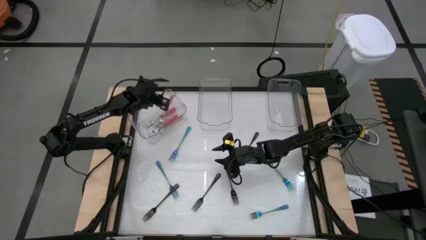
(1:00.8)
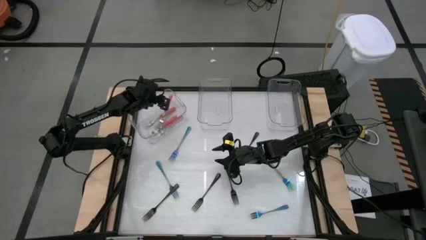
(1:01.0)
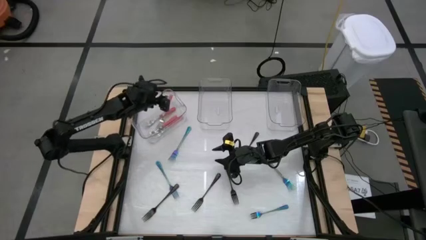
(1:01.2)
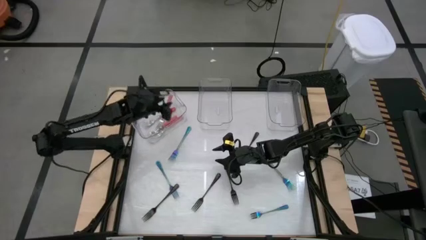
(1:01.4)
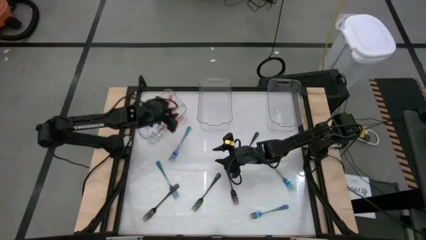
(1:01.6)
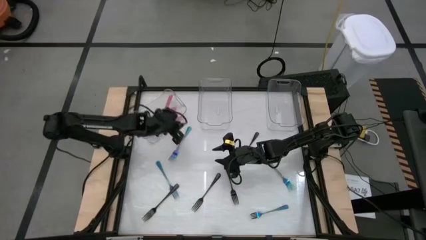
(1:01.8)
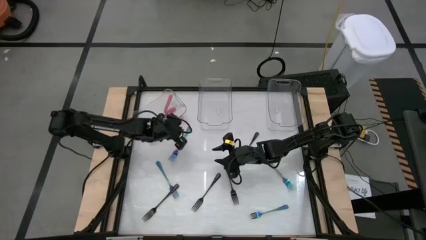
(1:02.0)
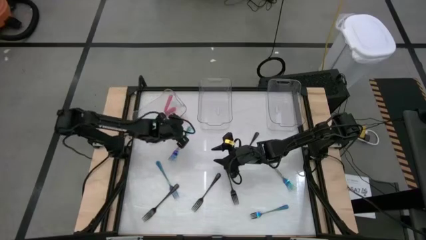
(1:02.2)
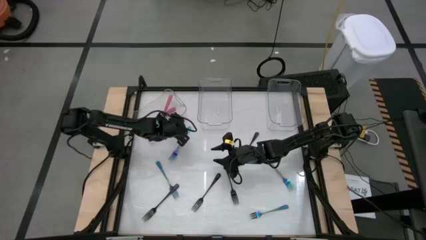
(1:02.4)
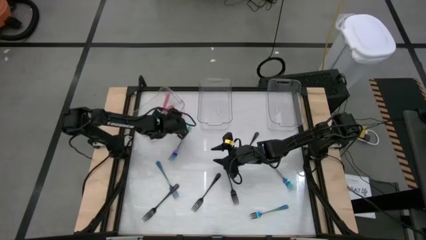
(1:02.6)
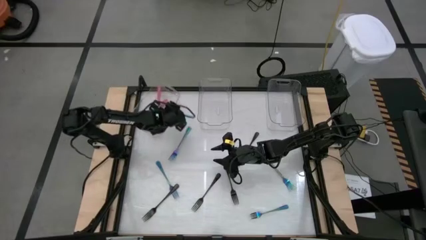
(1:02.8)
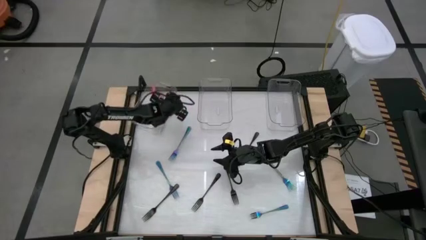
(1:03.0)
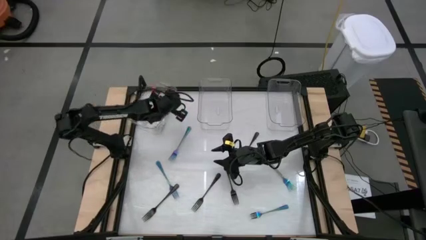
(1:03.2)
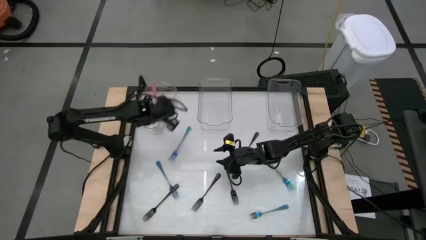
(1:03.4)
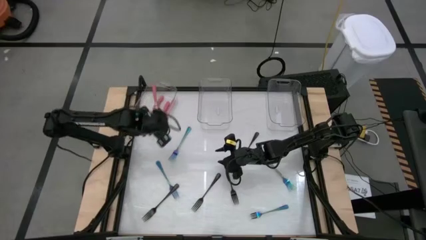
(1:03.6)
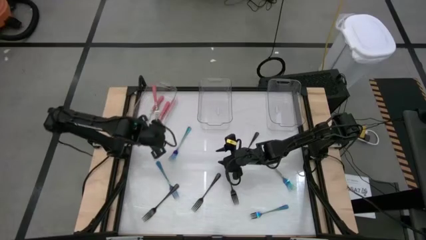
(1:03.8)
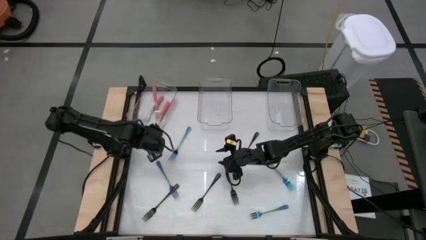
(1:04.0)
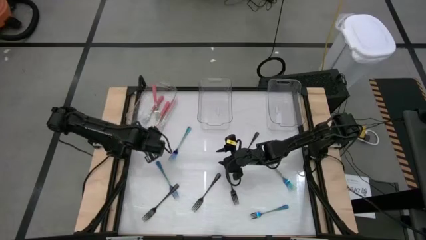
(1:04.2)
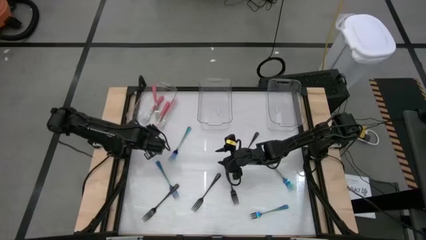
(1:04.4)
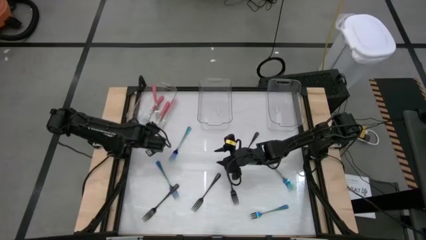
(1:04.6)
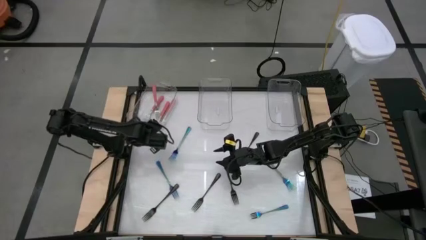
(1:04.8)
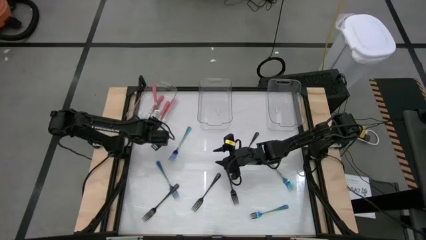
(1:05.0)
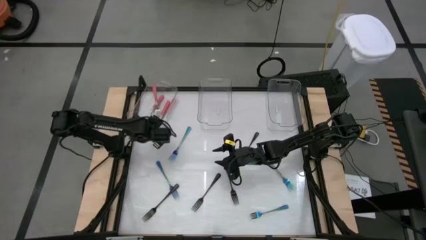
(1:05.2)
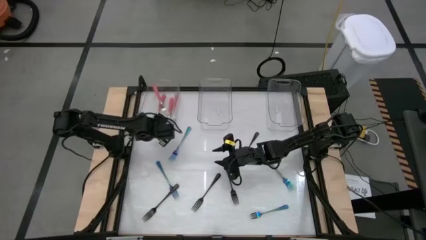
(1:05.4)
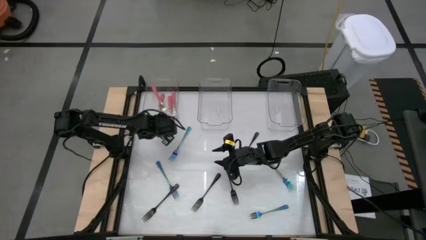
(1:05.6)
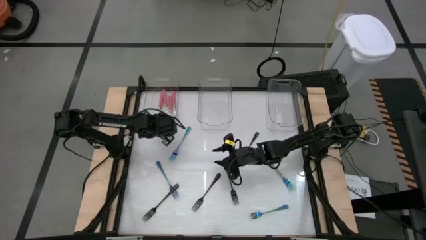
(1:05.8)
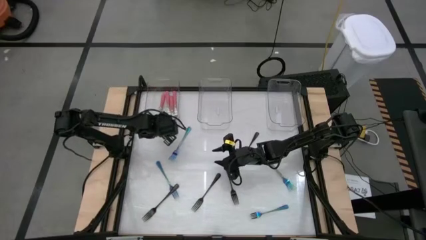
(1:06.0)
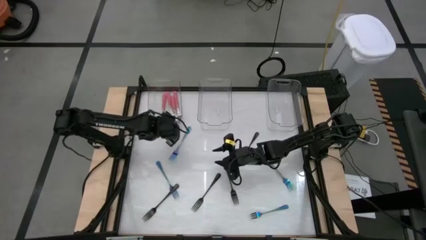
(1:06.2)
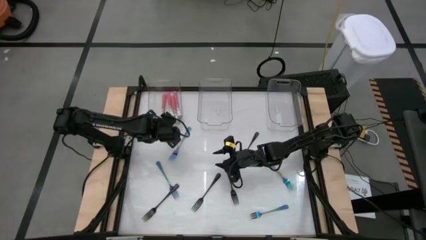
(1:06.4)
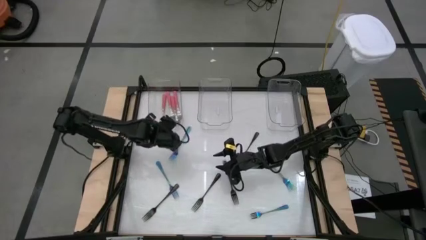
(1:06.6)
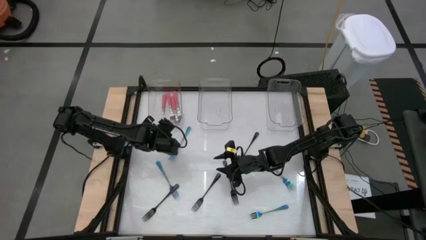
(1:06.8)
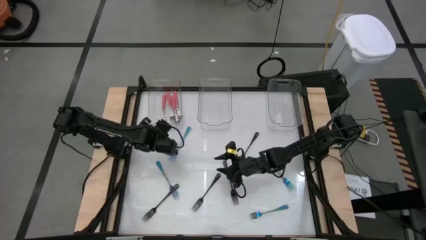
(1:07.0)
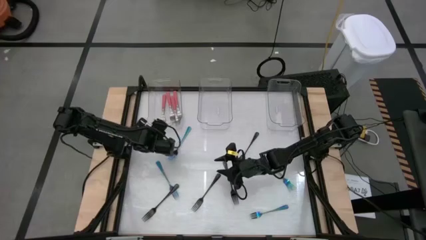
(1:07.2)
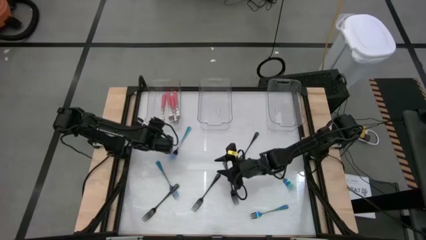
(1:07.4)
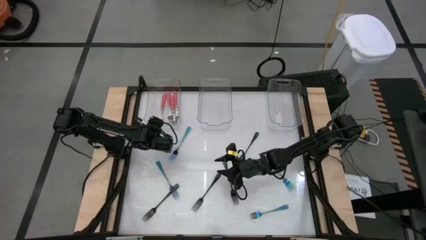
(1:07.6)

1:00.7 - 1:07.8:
Task: Sort silverware by color (type)
Adjust the left transparent bin on the table

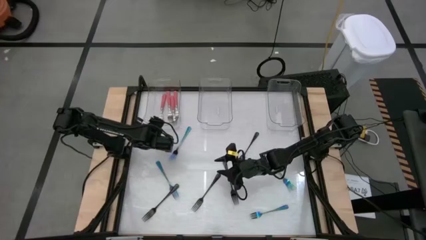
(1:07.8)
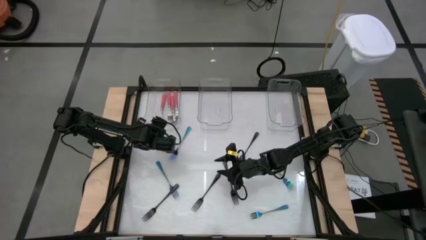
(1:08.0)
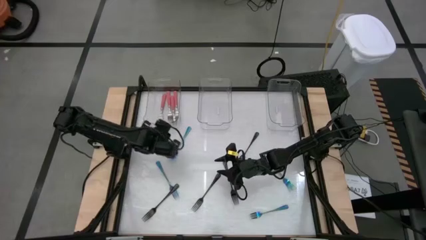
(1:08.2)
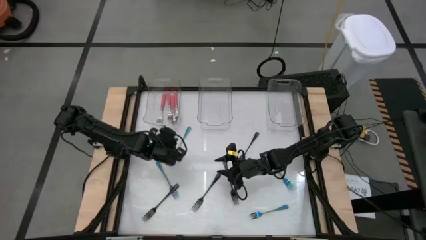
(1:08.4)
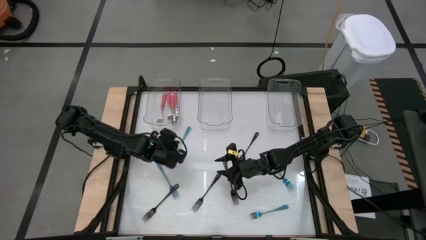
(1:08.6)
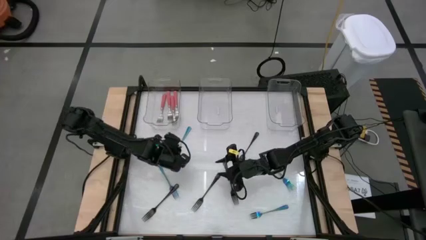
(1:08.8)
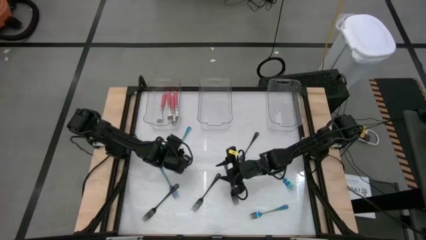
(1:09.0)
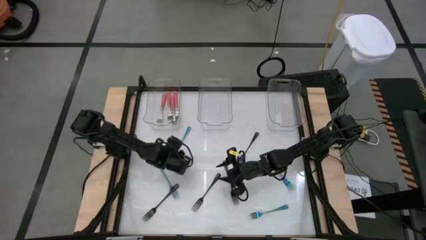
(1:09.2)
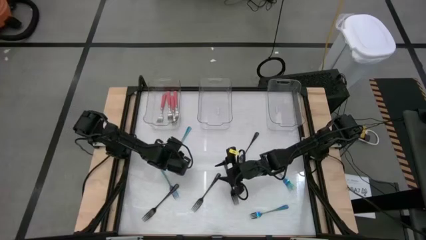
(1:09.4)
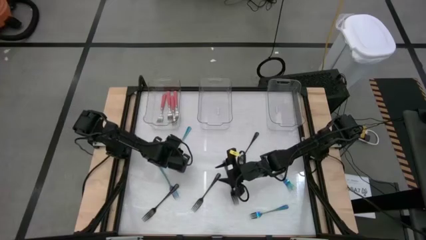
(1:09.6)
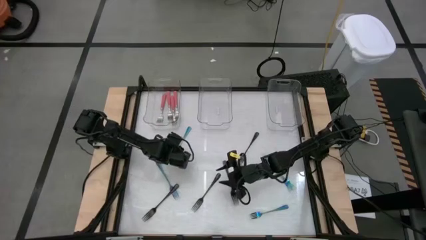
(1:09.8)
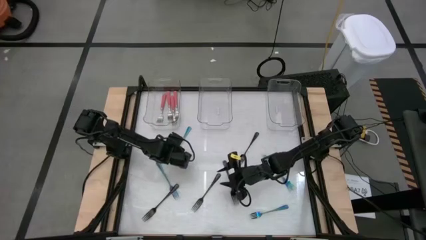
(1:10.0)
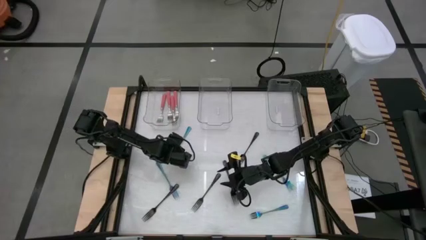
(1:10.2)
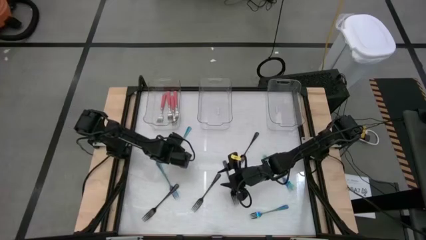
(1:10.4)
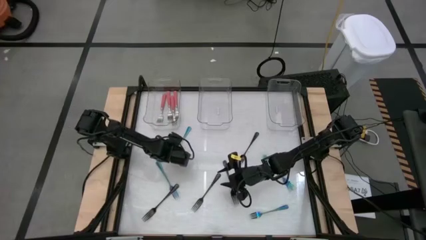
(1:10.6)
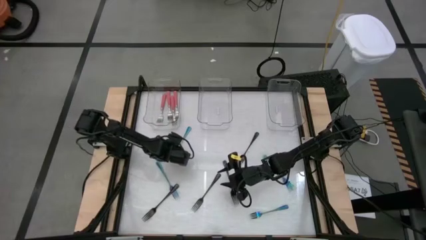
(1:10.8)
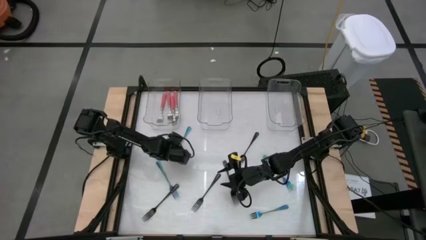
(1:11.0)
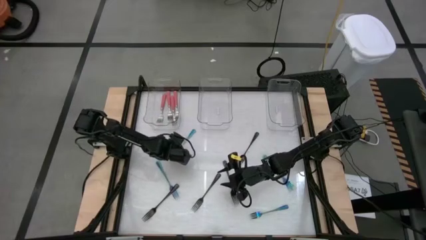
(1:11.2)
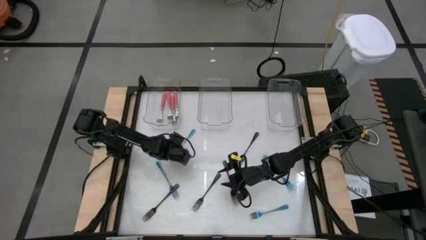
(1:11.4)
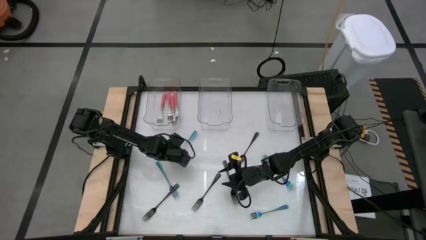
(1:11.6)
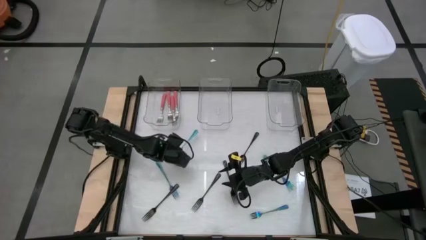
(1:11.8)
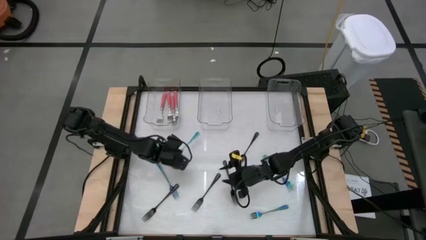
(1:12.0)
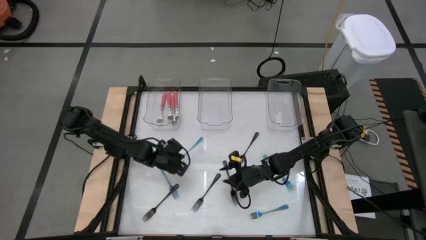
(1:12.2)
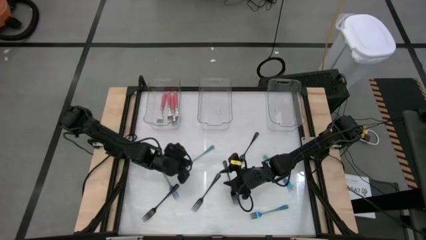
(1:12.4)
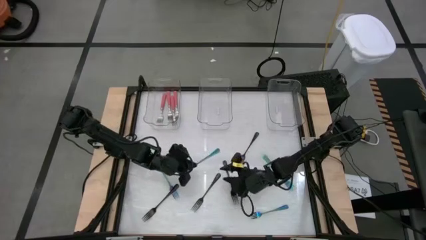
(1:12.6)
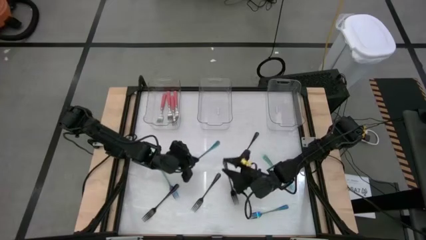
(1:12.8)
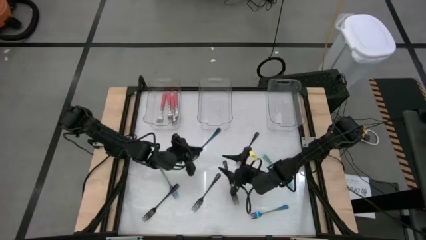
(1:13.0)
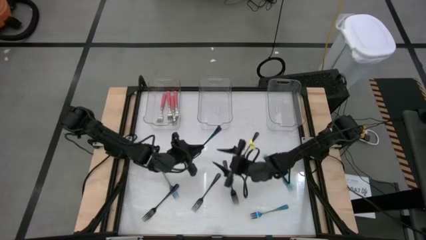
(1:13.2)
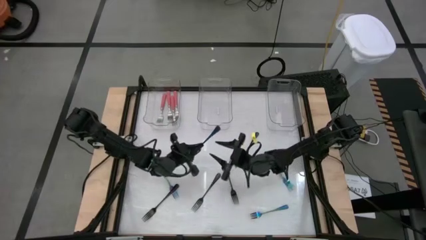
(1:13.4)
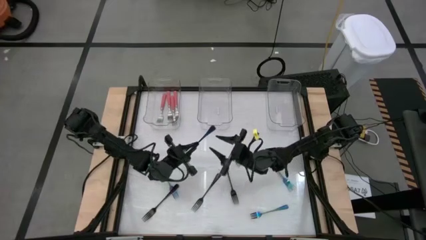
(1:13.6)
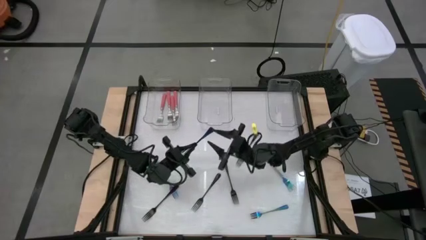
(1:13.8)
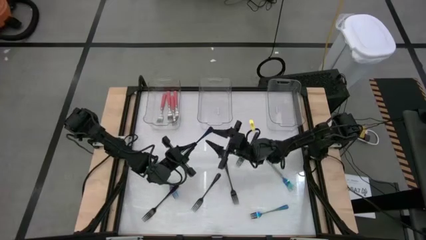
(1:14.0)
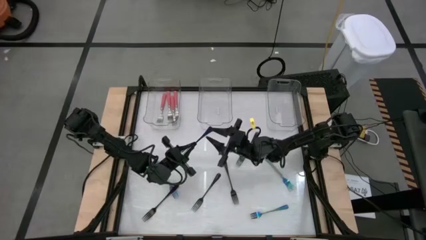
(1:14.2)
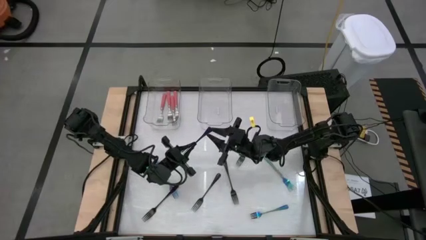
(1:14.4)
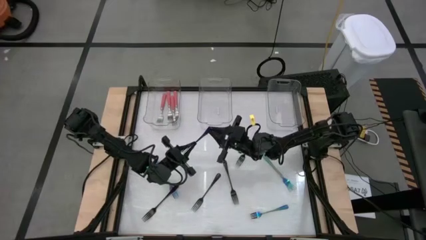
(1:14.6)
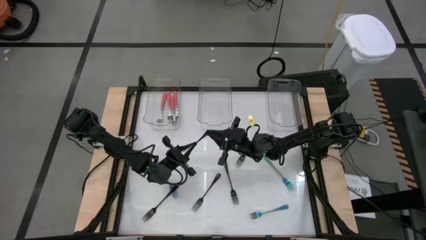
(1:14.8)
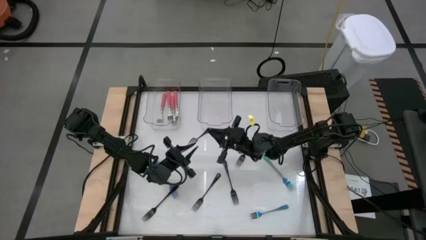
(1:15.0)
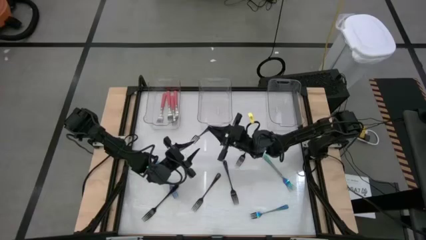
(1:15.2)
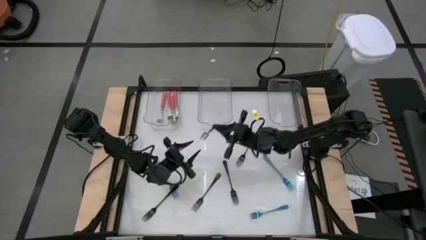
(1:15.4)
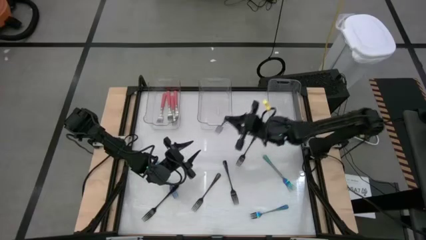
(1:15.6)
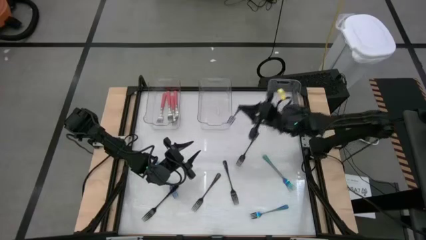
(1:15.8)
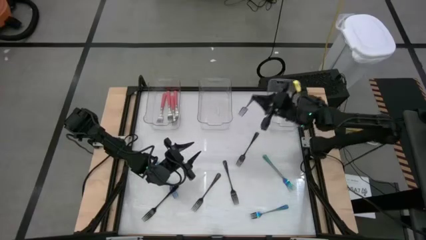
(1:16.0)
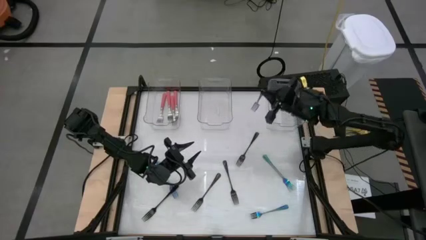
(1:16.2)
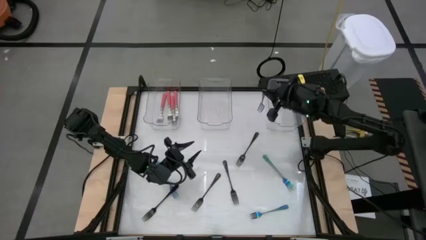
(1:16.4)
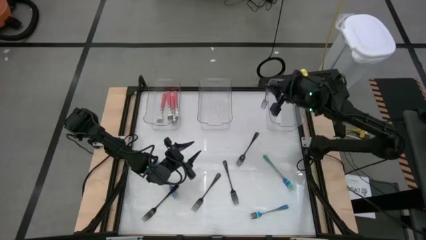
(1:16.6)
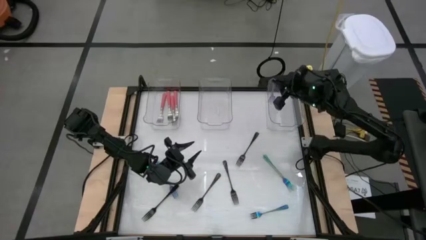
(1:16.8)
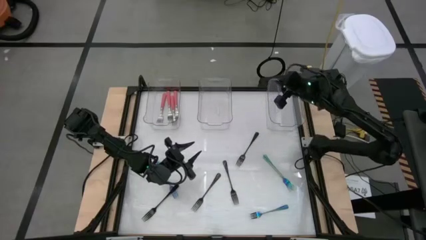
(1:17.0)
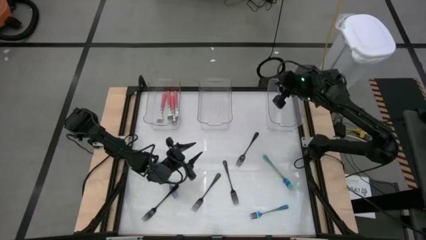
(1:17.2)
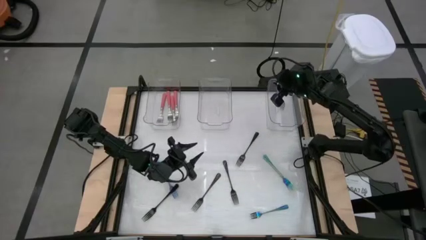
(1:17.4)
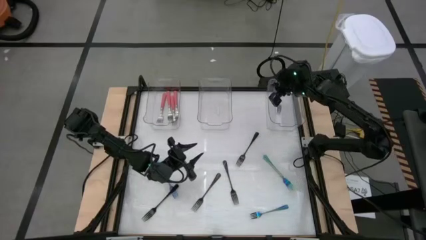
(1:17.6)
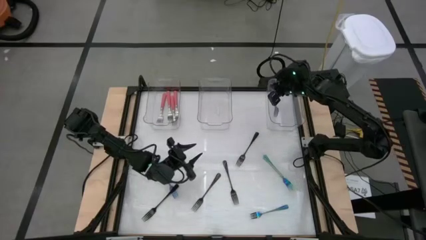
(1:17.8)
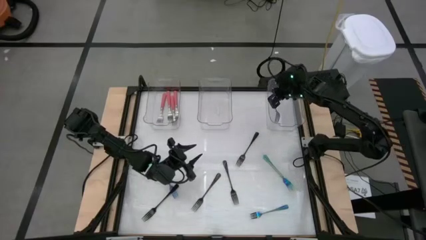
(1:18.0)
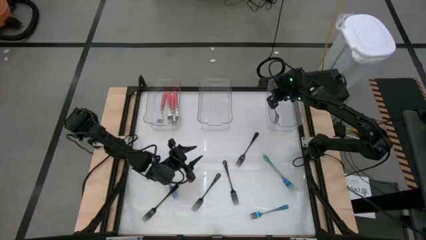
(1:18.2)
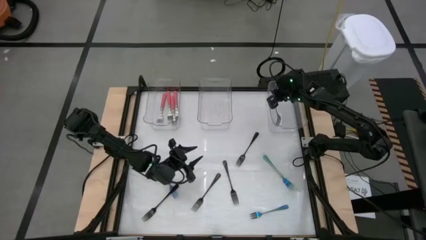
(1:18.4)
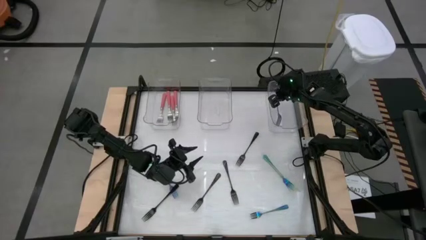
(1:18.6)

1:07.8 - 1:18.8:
Put the blue fork into the right transparent bin
